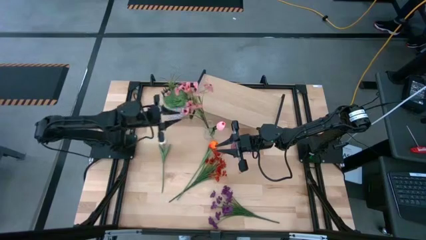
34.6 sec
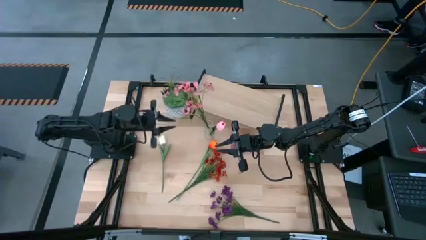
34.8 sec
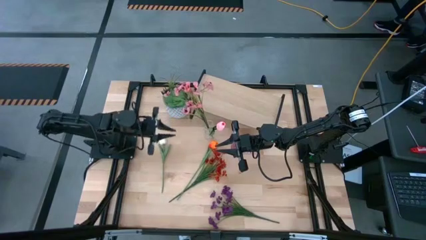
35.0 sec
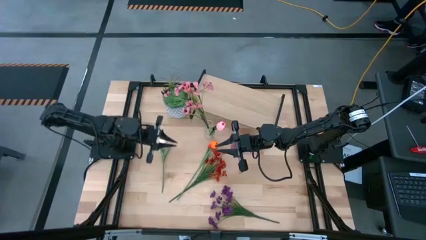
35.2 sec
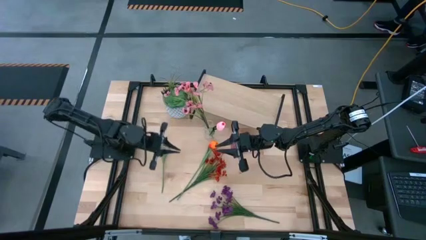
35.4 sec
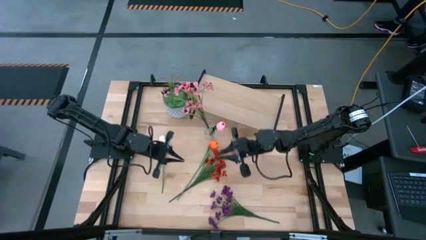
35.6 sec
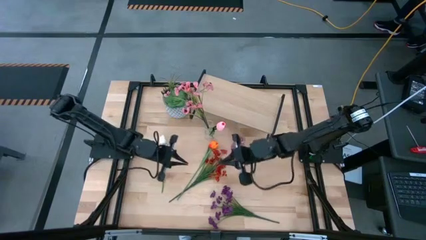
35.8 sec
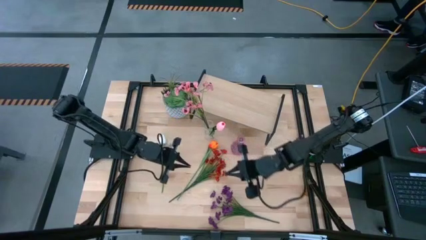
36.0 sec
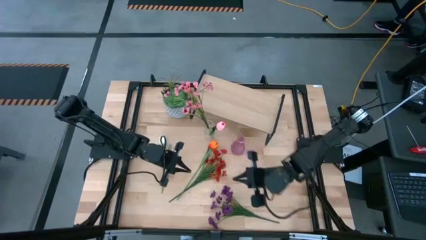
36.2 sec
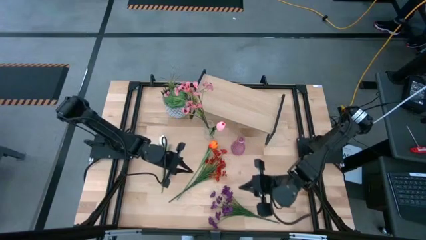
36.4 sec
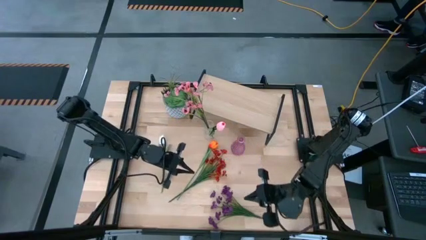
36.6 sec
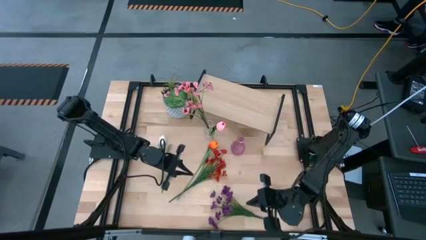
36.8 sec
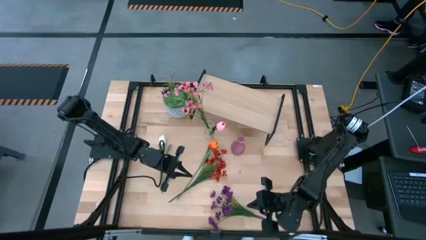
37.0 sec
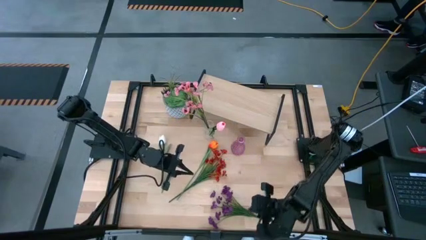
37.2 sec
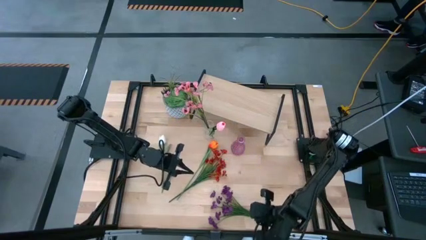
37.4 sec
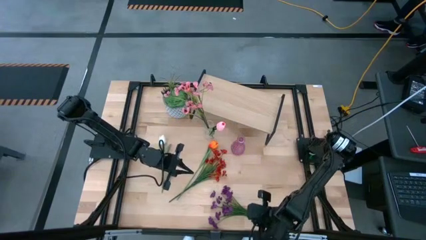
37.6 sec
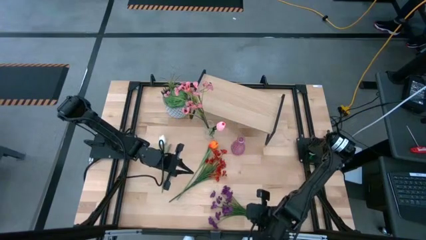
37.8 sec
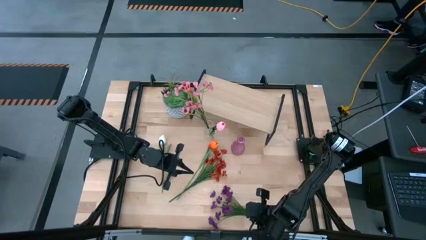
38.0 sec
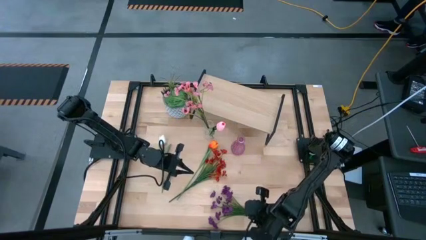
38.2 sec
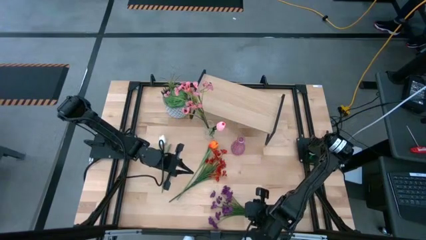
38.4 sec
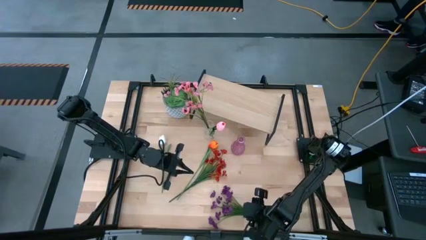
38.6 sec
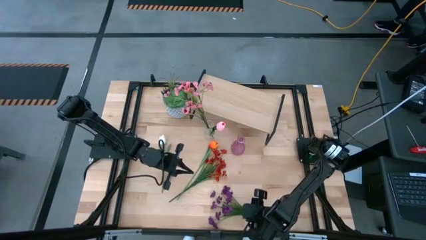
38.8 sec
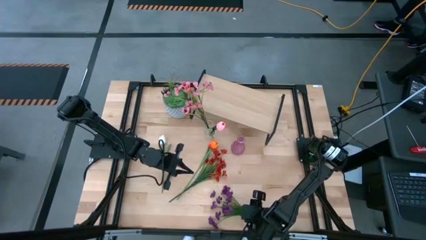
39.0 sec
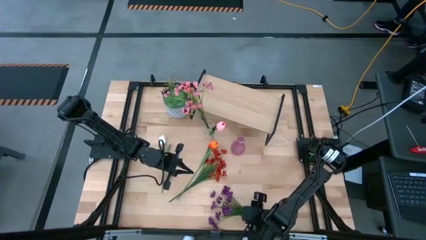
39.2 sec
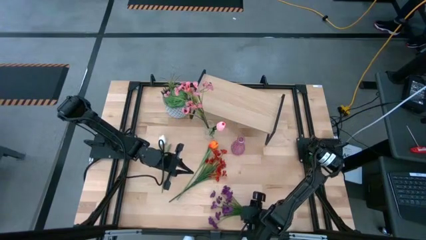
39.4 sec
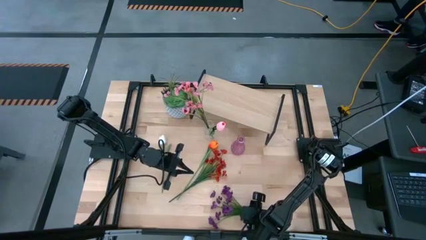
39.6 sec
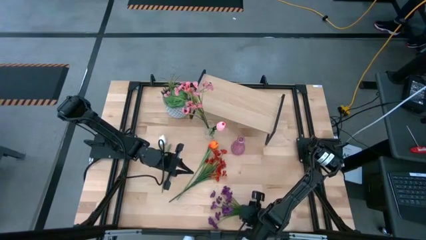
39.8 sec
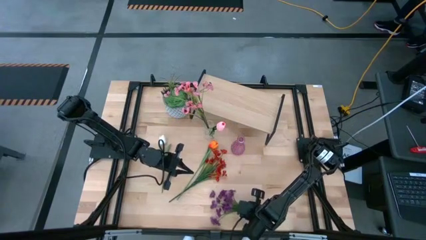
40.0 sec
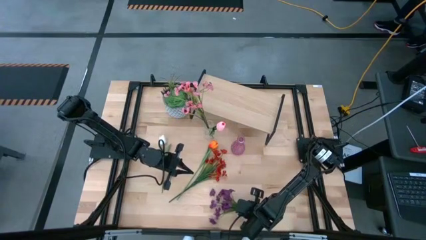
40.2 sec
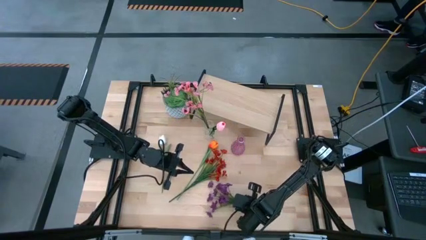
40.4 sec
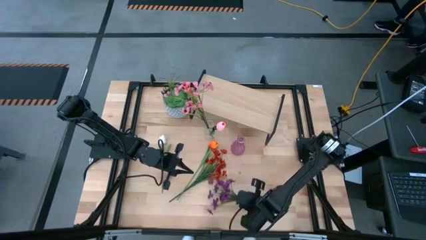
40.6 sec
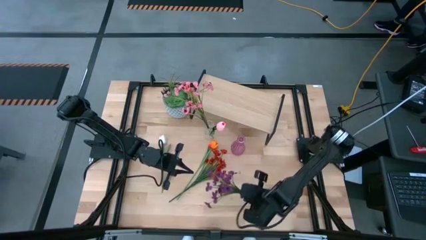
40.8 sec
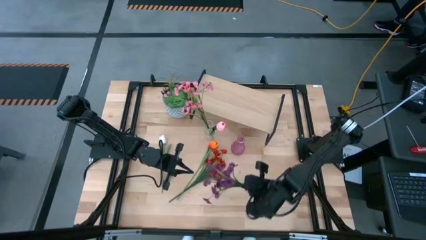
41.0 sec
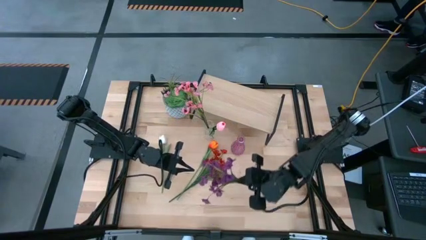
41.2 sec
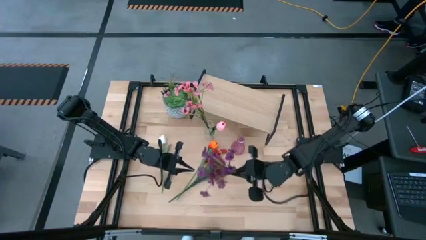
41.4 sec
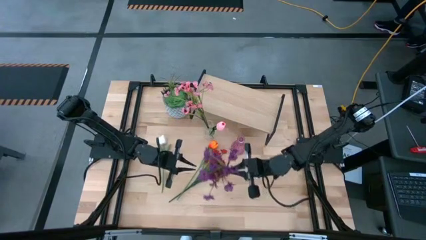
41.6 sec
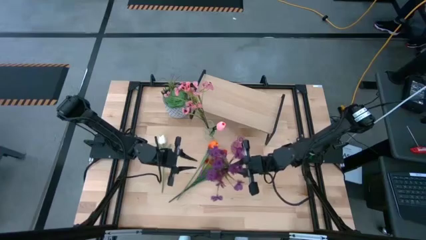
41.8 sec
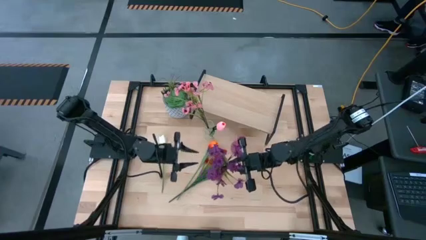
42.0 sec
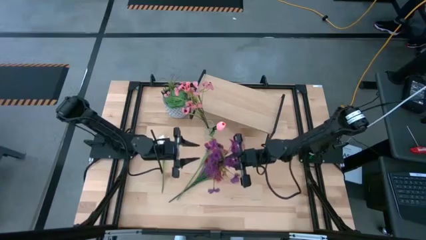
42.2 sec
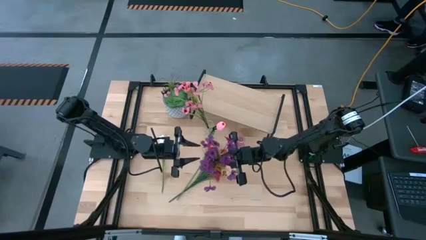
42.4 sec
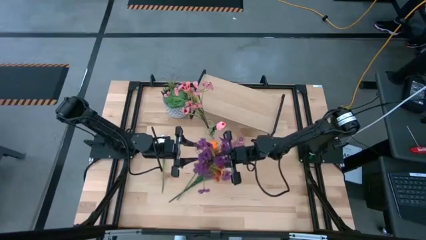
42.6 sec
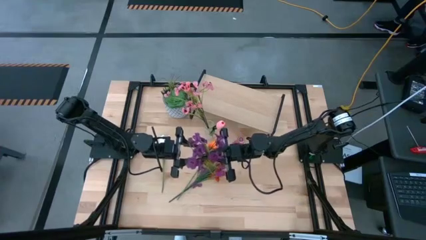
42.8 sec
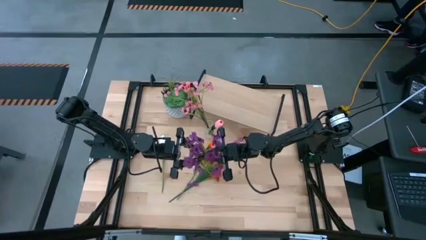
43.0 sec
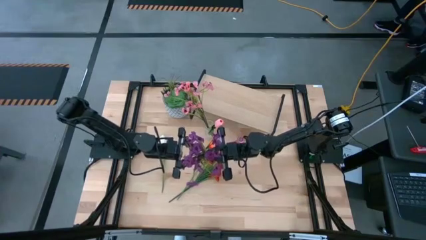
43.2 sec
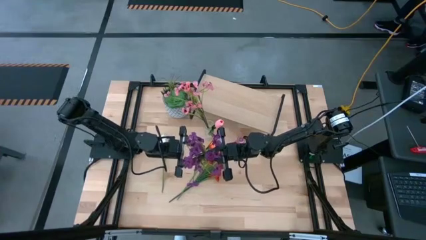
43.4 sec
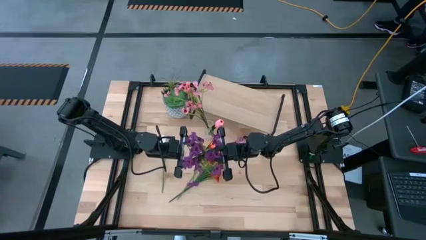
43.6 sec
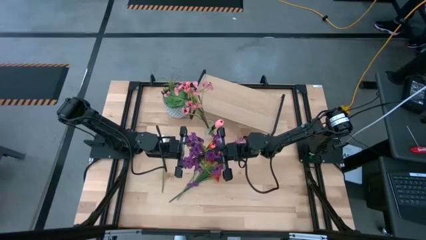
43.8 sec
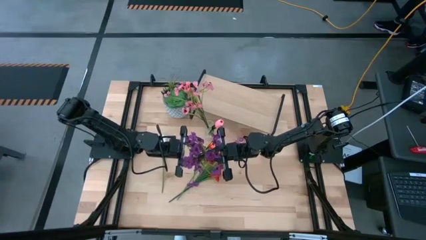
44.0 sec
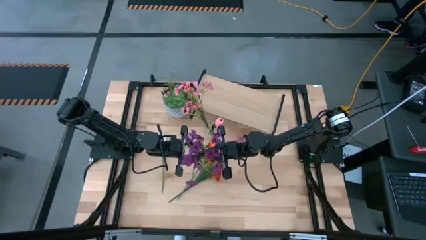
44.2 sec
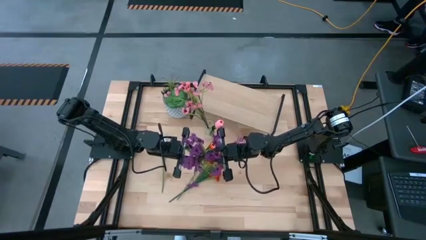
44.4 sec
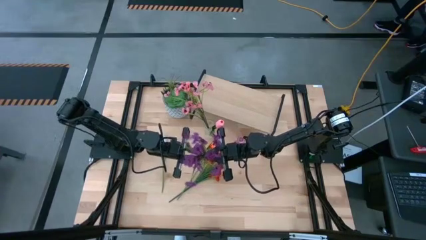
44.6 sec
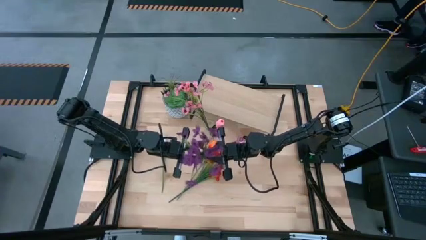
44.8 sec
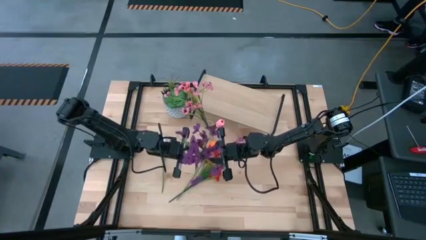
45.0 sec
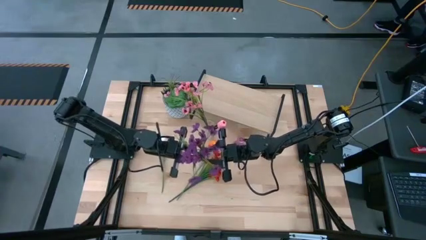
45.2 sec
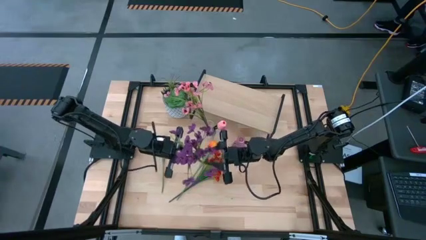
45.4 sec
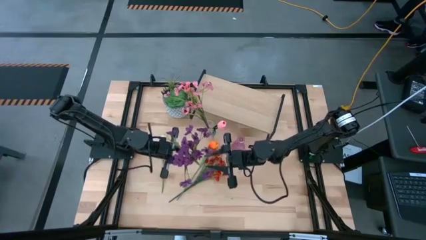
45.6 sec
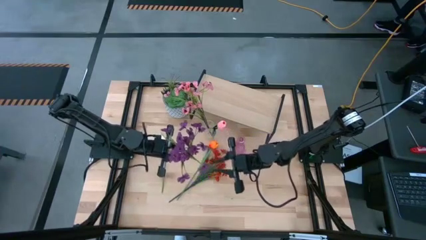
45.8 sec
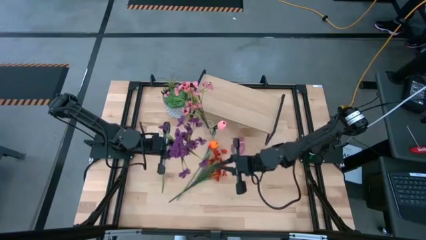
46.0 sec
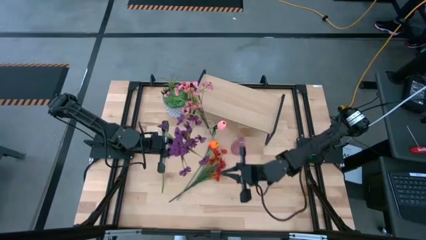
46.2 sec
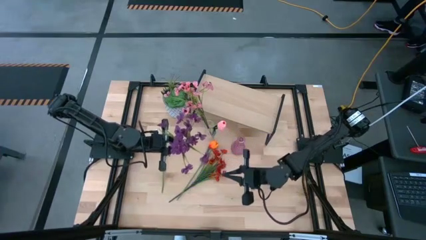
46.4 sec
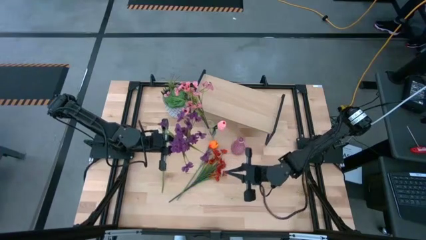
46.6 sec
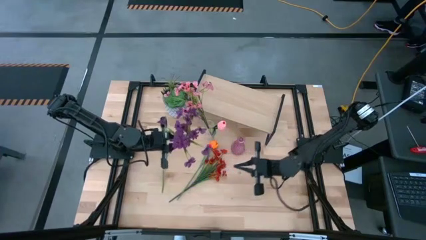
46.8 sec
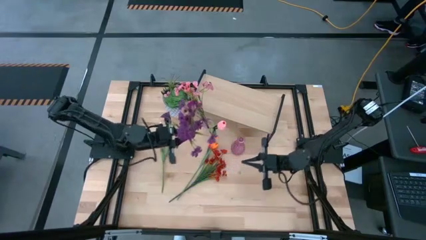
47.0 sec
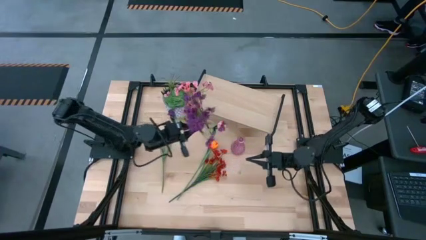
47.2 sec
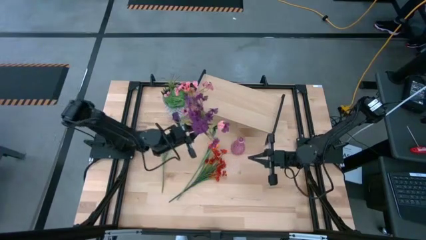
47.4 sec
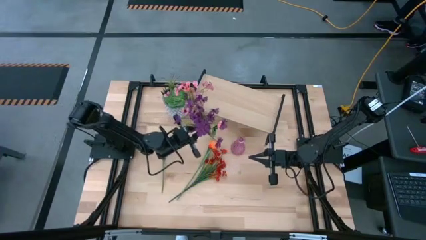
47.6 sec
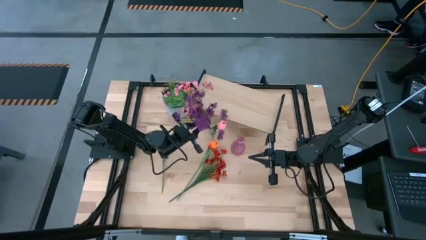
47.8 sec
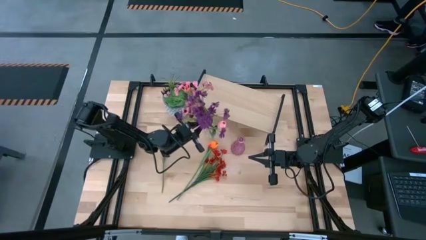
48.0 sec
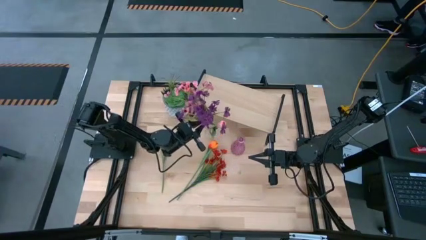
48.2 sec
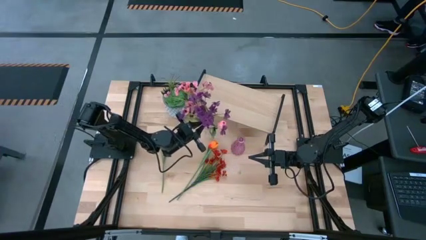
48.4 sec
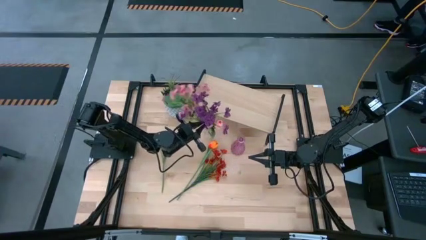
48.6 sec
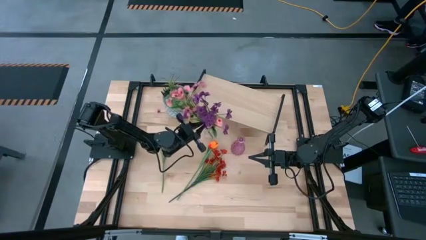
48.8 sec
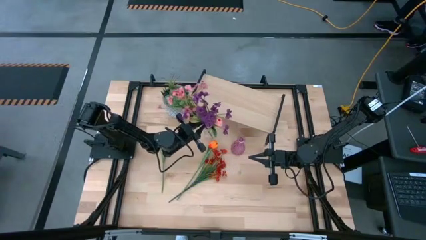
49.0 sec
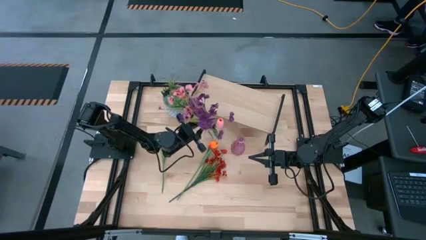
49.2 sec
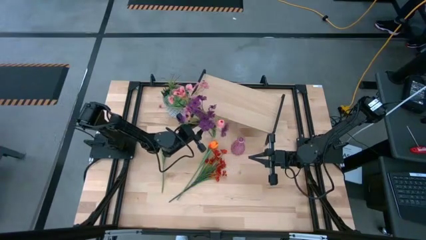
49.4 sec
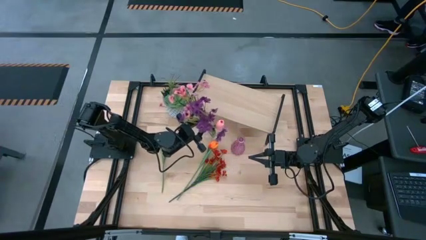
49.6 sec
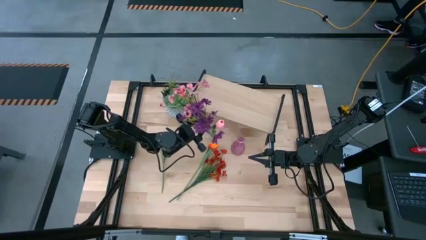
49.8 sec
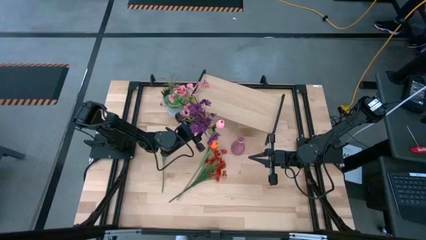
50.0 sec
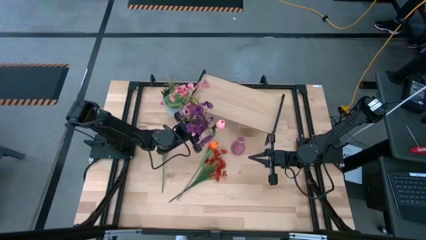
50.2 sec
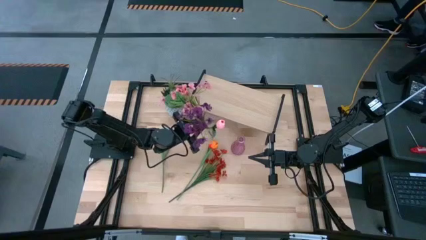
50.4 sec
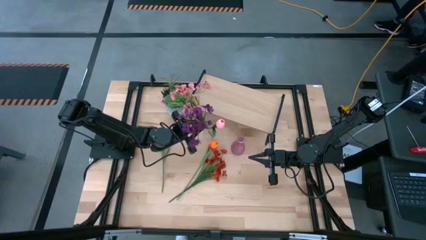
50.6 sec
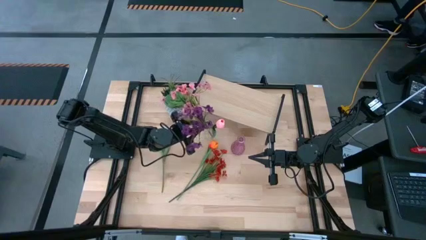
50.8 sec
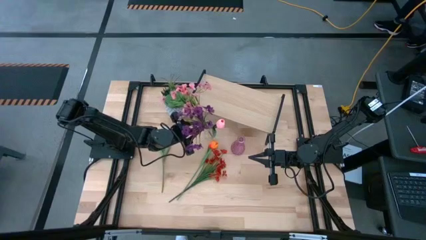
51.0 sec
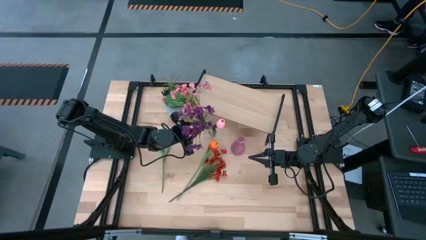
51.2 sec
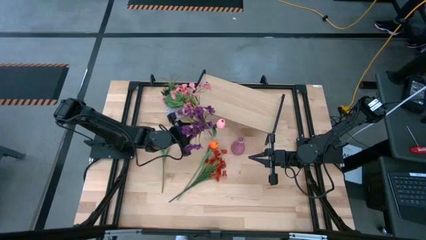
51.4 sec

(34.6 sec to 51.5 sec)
Task: Pick and place flowers into a vace then onto a shelf
Put the purple flowers into the transparent vase
